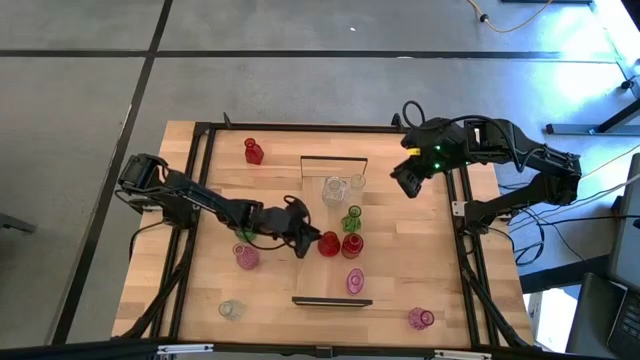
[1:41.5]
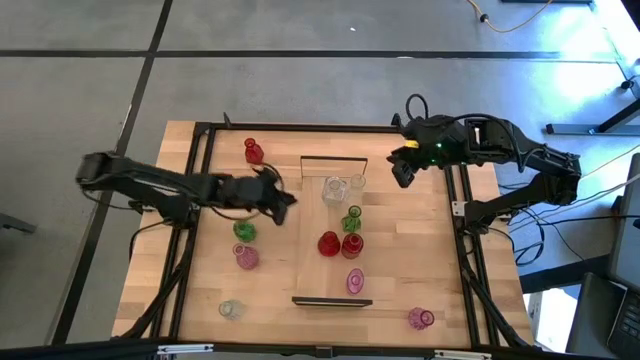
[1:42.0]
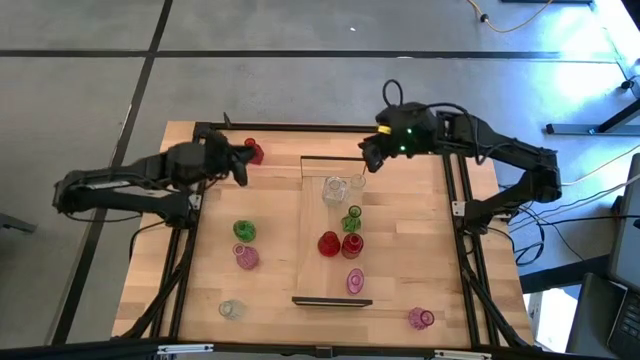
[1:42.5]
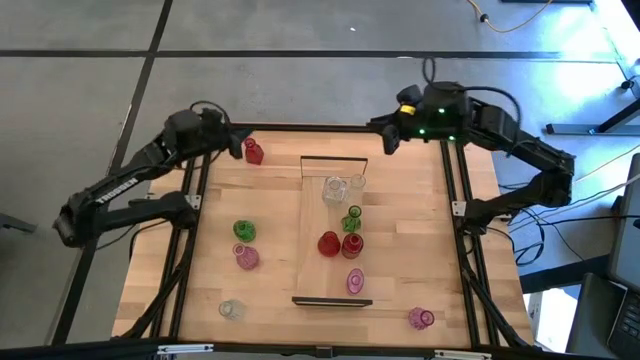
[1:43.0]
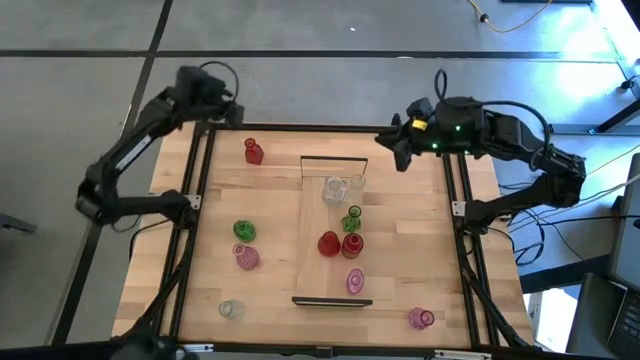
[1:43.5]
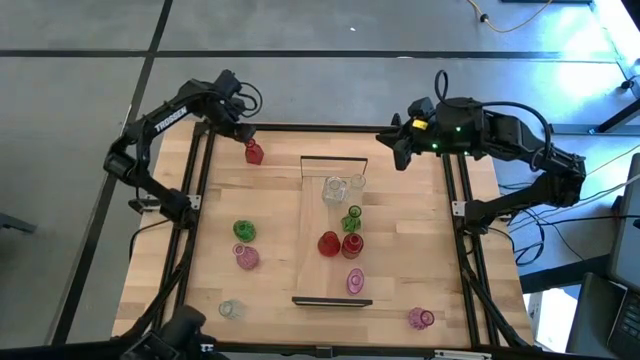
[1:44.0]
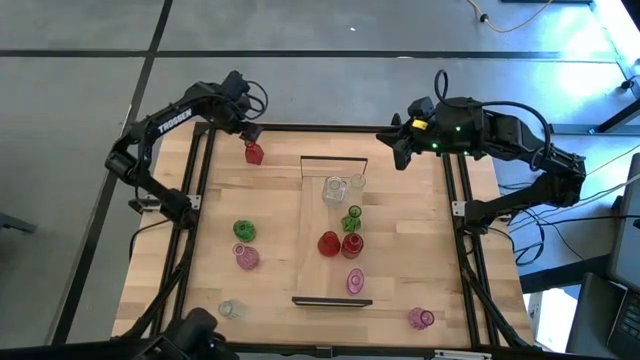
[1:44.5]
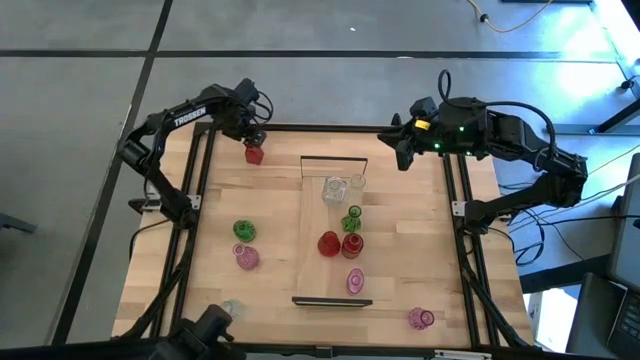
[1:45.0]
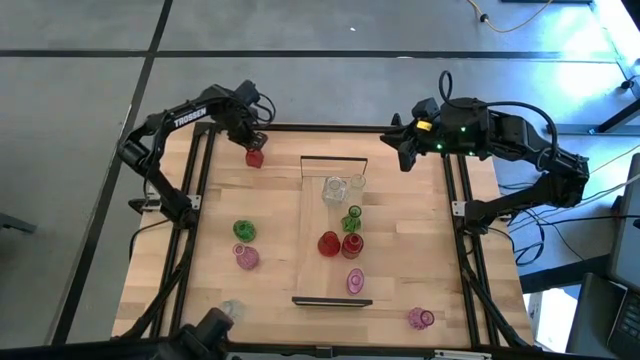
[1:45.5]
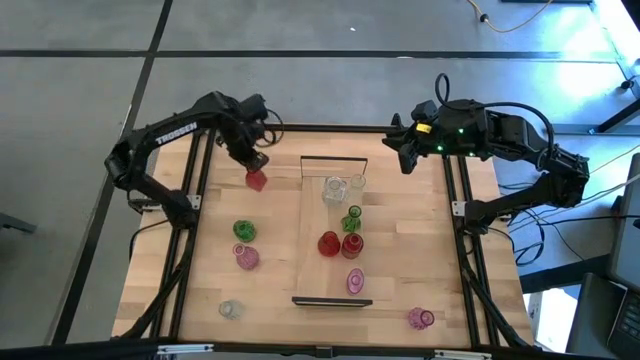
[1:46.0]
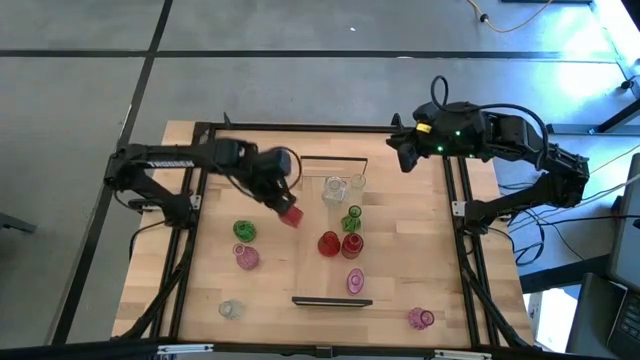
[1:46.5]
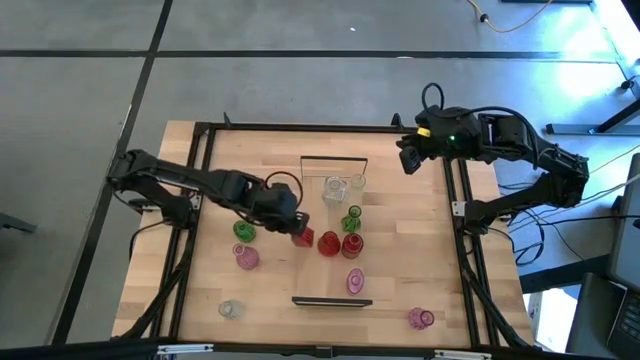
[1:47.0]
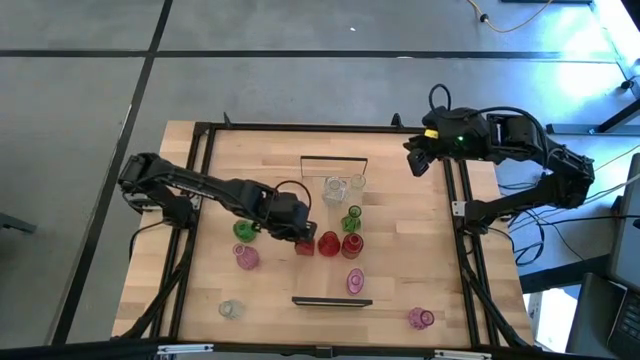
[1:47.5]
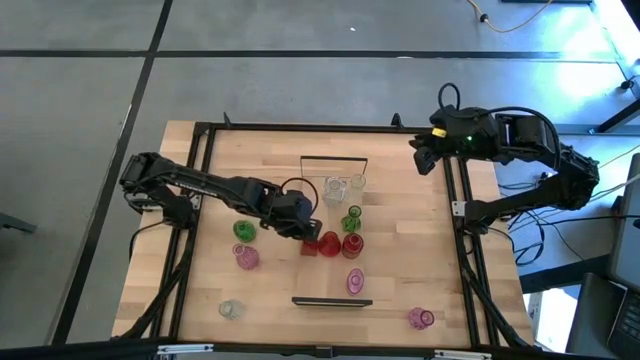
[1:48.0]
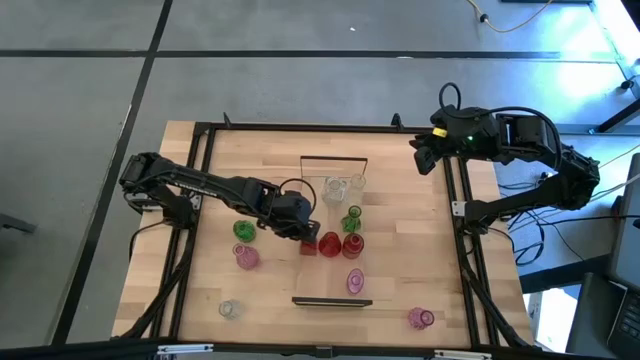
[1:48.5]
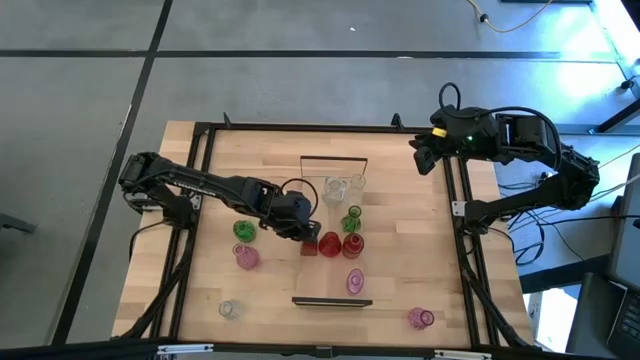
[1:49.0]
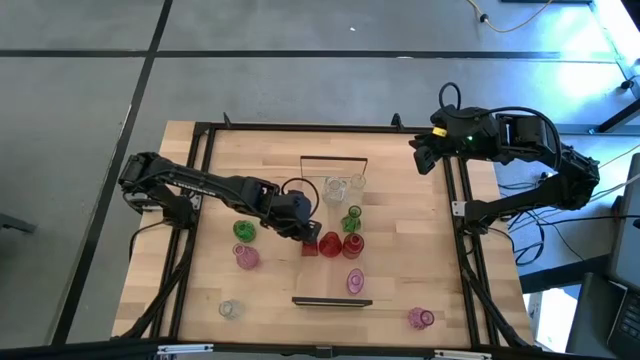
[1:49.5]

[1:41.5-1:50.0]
Task: sort vases onto shelf
Put the red vase aligned with the other red vases on the shelf

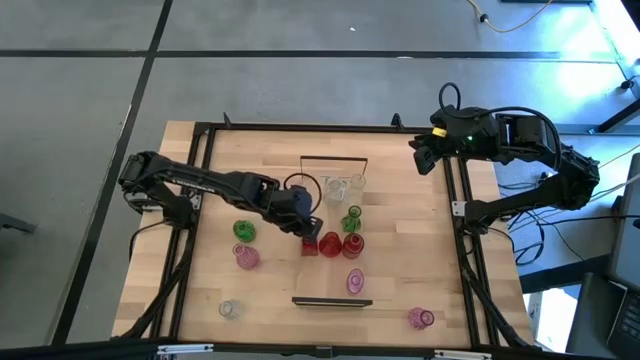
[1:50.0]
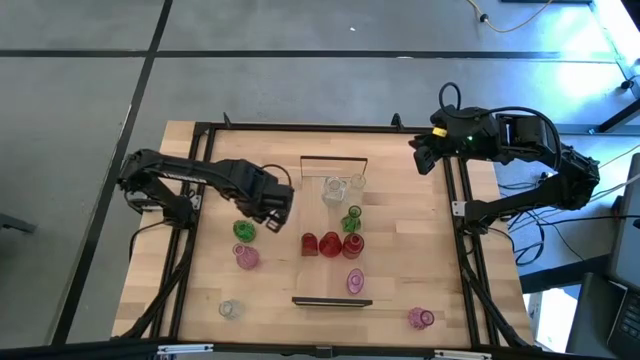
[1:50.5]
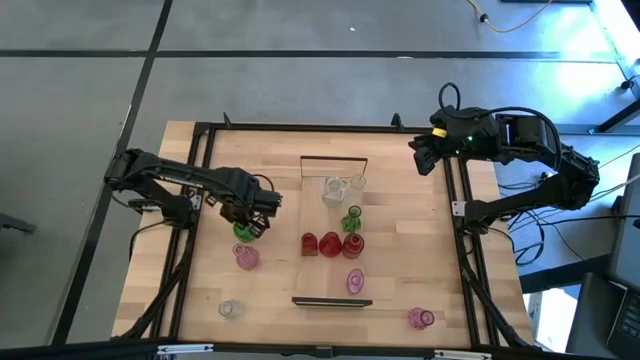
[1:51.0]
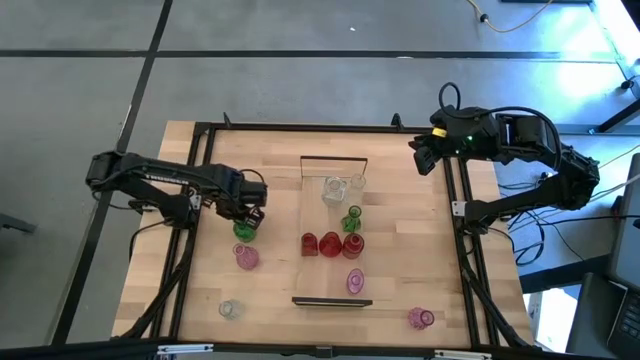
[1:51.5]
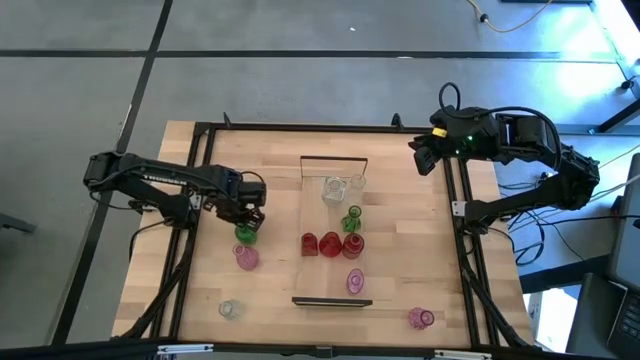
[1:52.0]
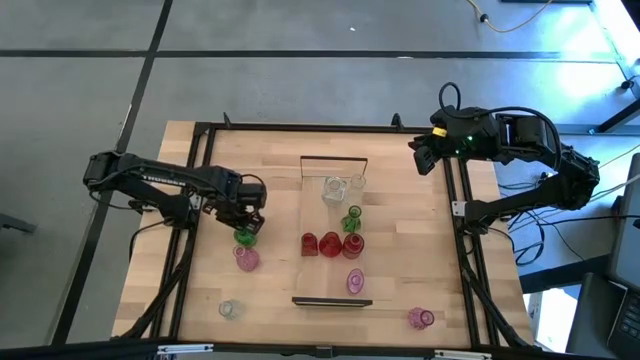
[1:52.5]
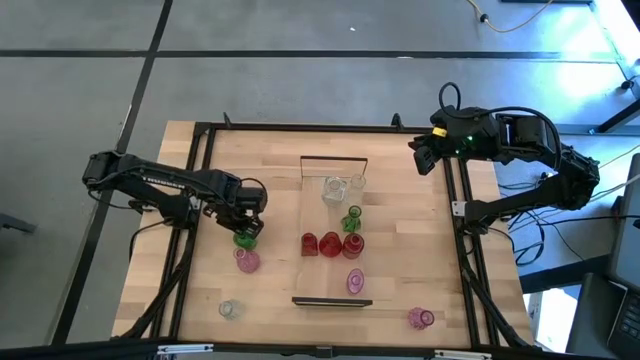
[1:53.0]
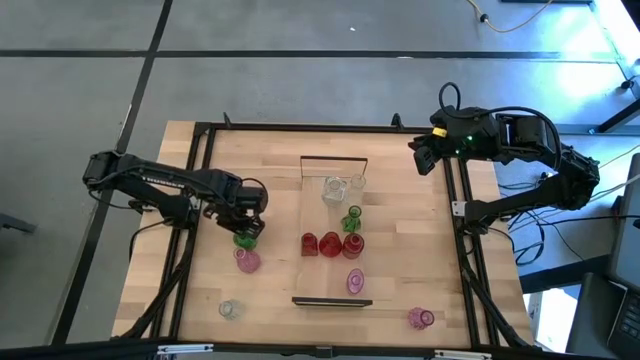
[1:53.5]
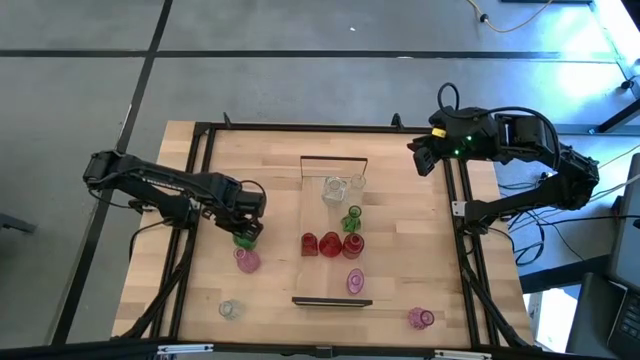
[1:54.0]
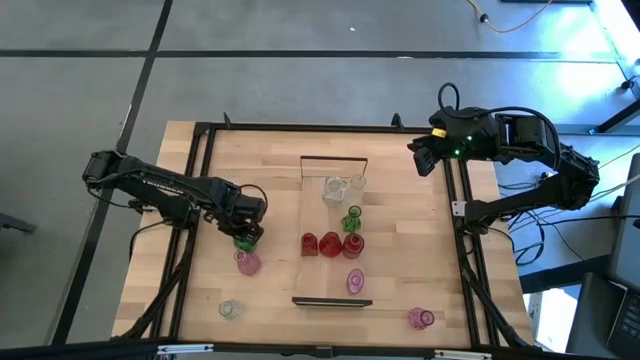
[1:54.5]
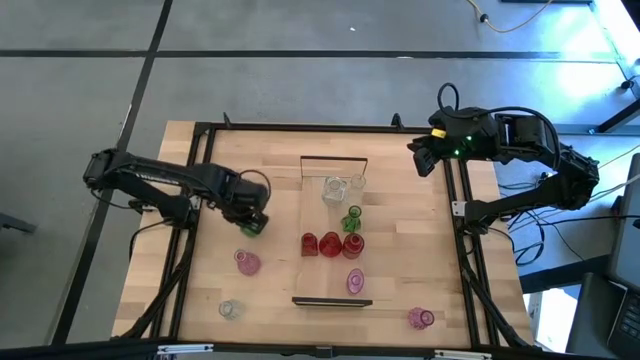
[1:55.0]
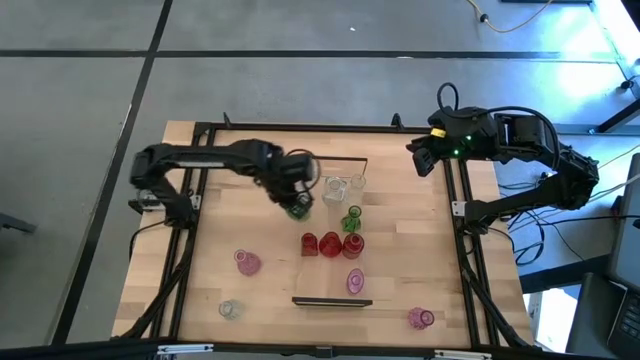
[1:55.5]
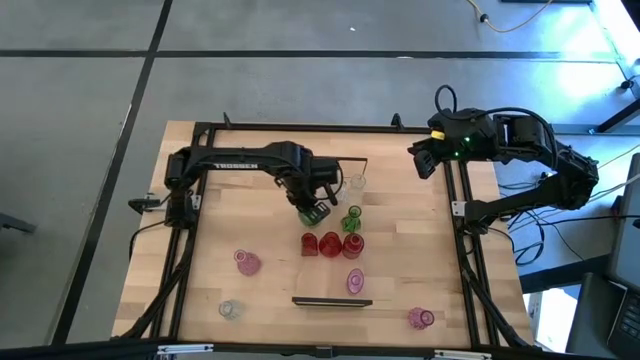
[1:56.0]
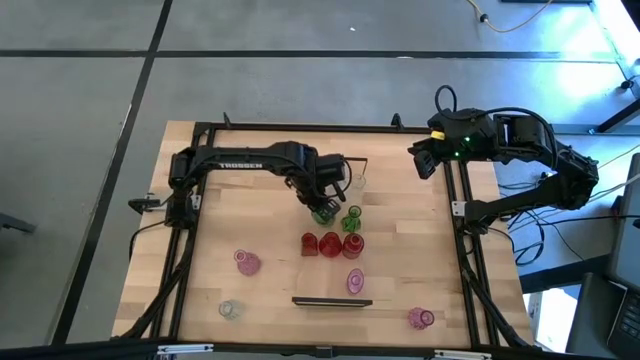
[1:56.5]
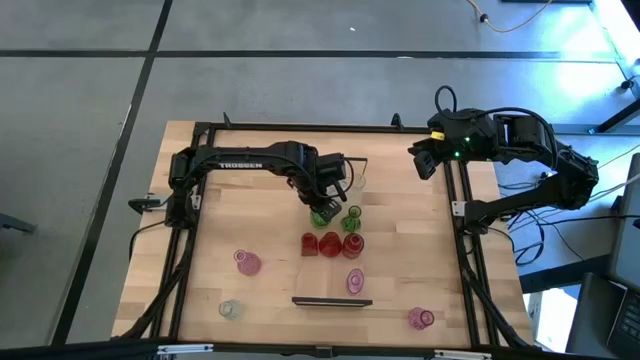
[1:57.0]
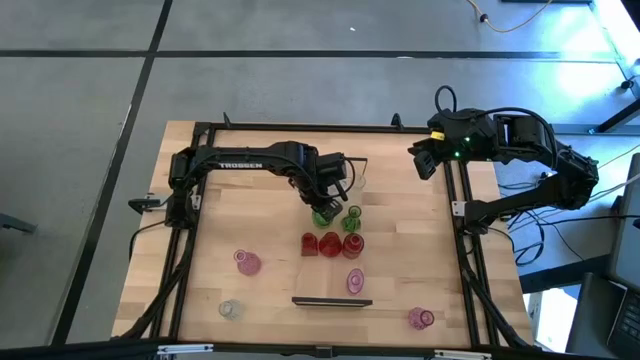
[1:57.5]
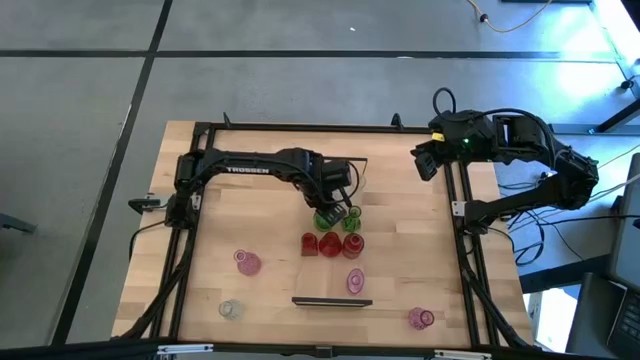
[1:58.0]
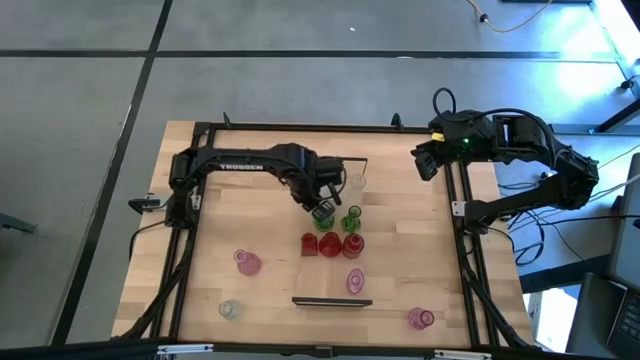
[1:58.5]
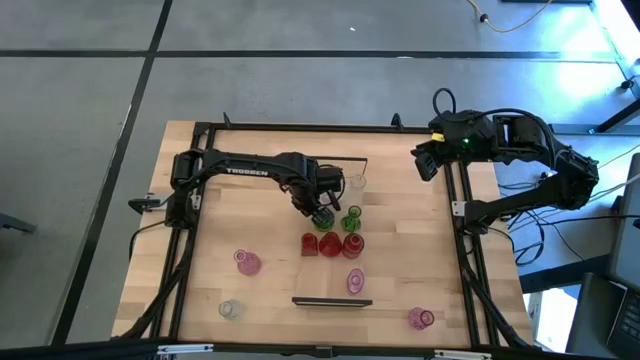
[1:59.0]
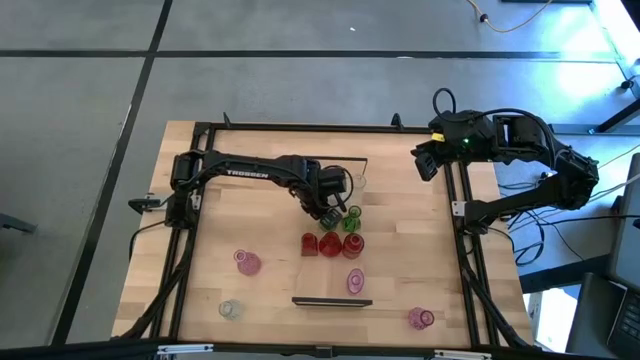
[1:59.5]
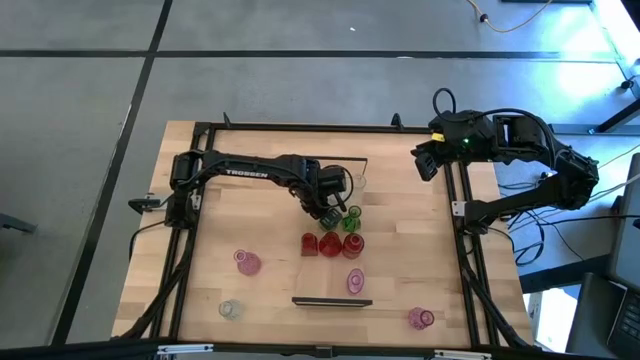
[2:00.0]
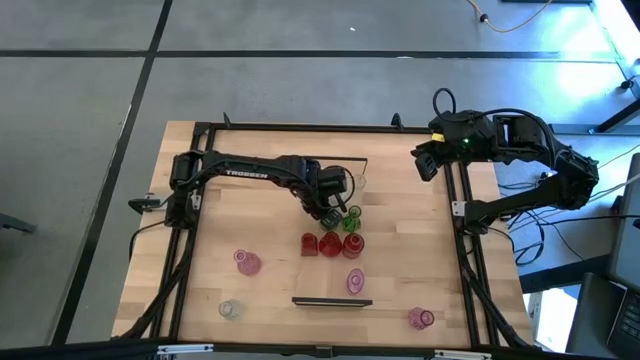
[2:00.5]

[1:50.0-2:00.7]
Put the green vase aligned with the other green vase on the shelf

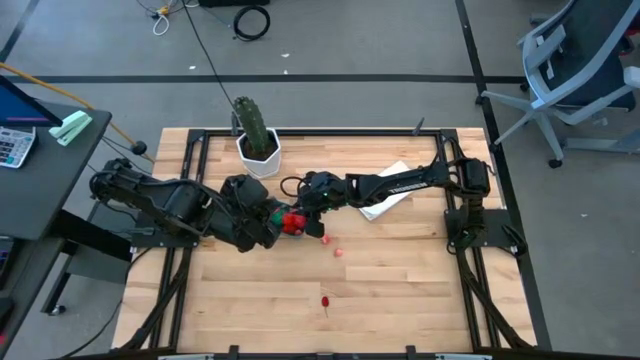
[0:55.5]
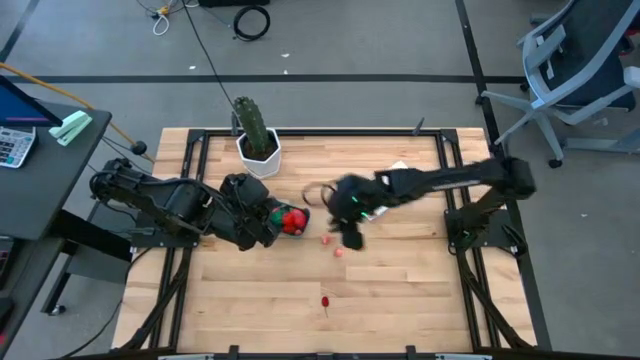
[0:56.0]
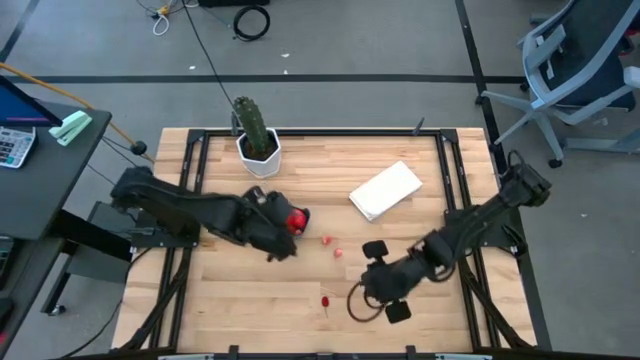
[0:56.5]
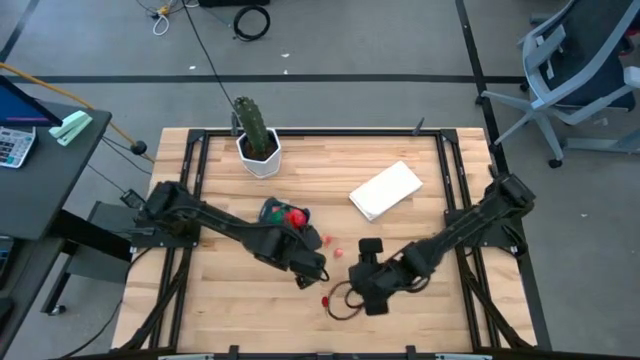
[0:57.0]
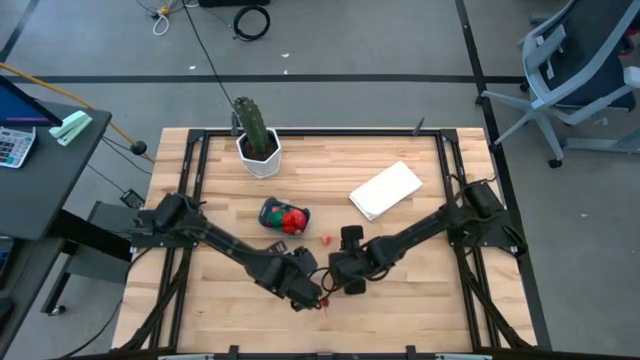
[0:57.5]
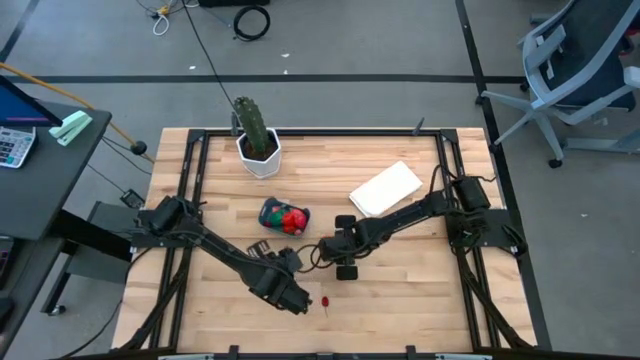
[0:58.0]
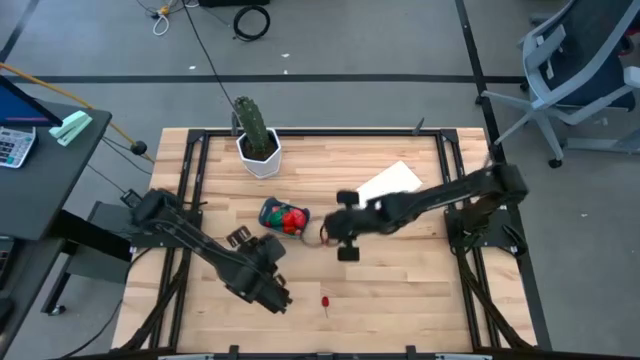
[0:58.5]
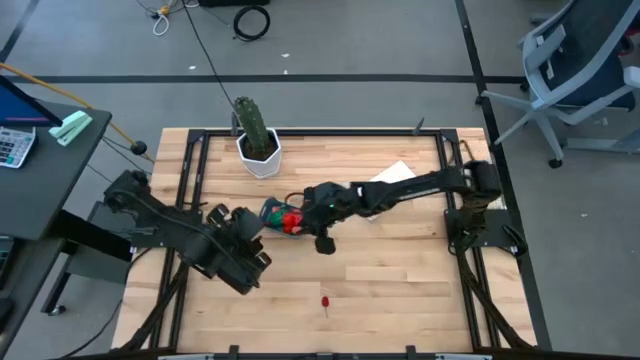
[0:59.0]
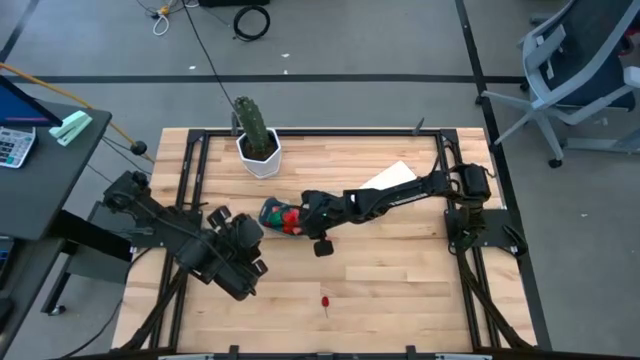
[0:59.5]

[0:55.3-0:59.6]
Task: Pick and placing Produce into tupperware
Put the bottom pink peach into the blue bin
